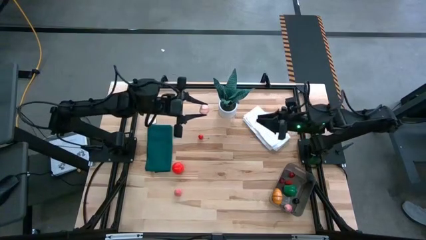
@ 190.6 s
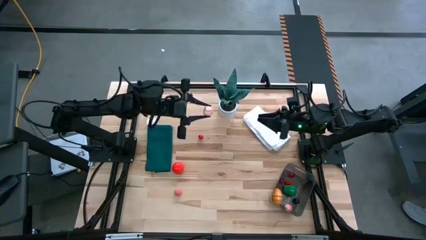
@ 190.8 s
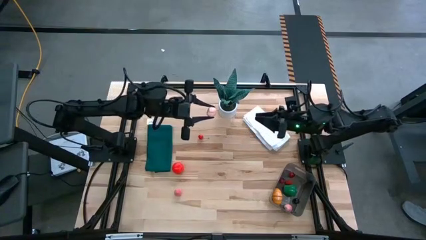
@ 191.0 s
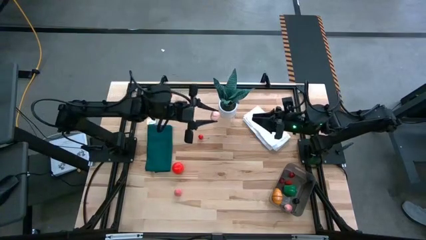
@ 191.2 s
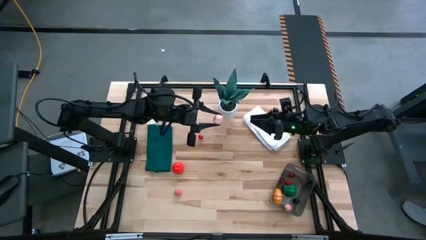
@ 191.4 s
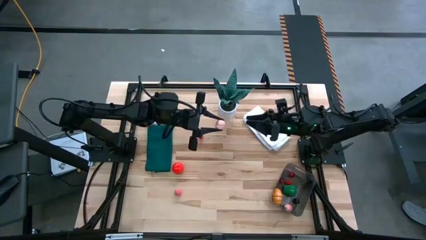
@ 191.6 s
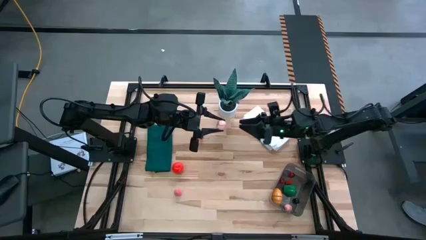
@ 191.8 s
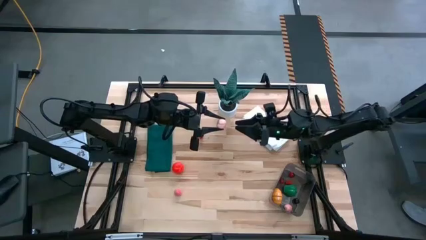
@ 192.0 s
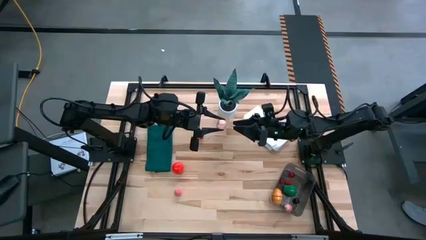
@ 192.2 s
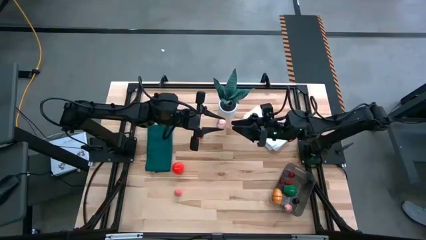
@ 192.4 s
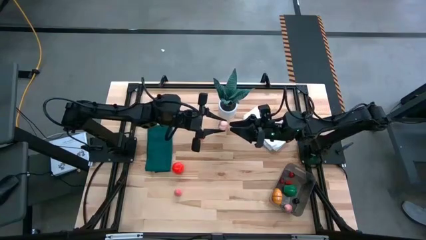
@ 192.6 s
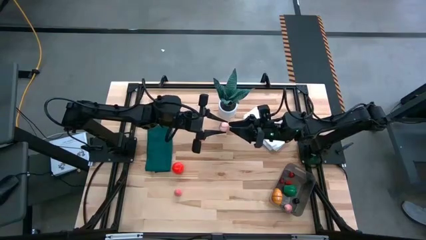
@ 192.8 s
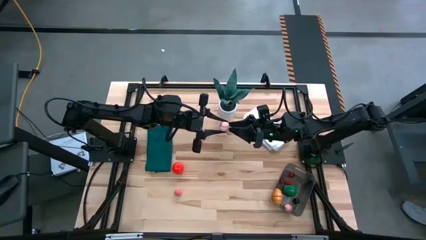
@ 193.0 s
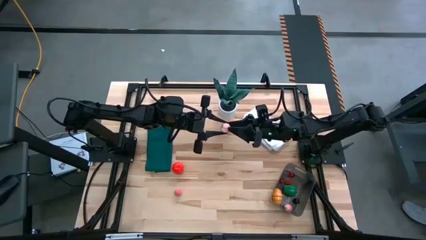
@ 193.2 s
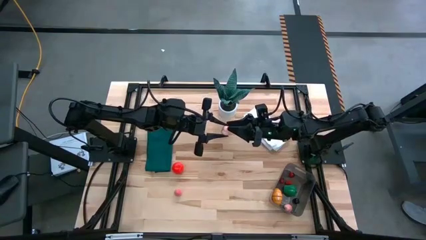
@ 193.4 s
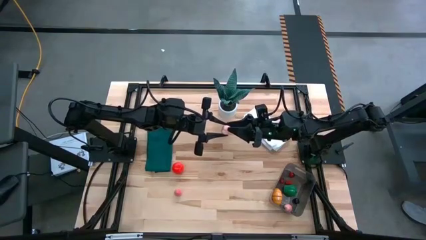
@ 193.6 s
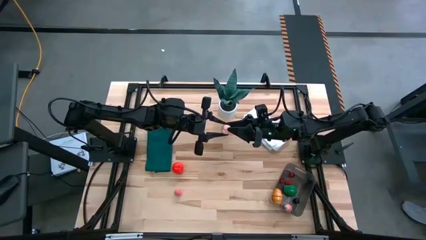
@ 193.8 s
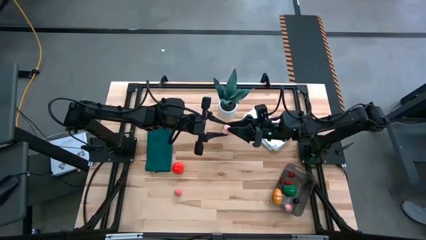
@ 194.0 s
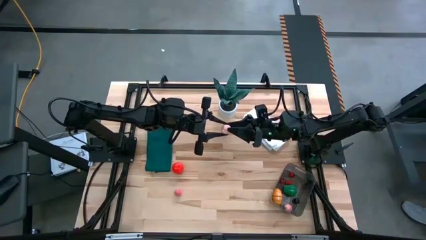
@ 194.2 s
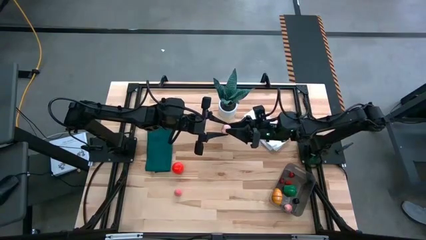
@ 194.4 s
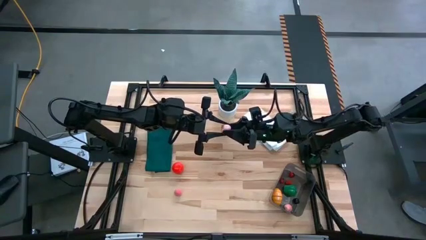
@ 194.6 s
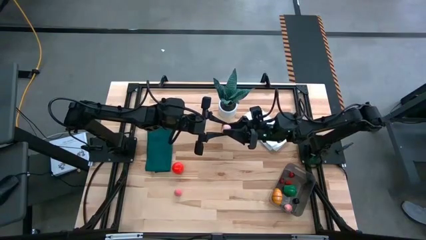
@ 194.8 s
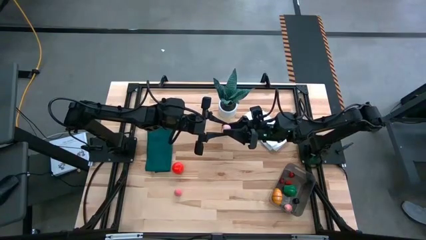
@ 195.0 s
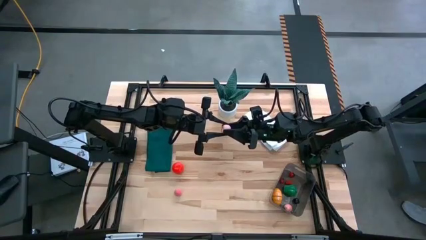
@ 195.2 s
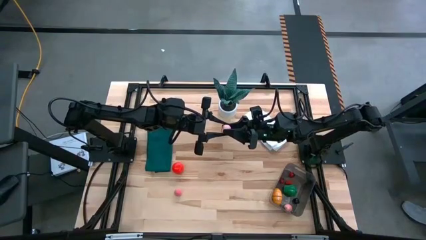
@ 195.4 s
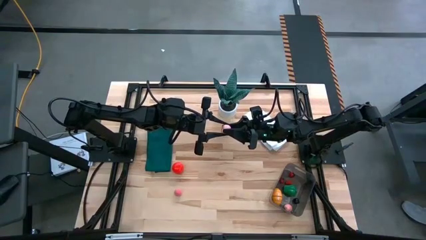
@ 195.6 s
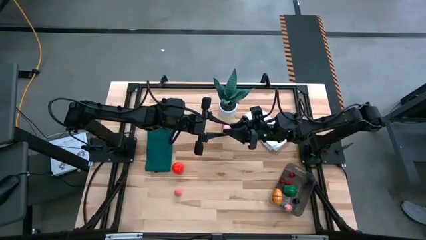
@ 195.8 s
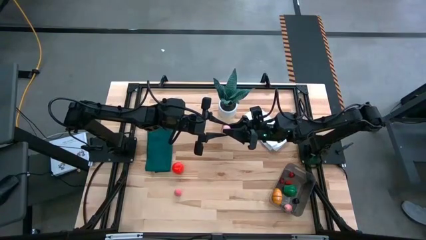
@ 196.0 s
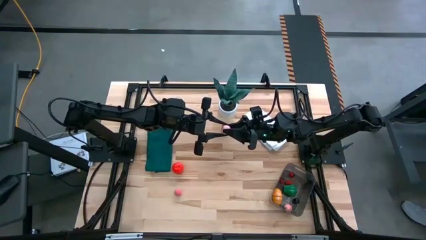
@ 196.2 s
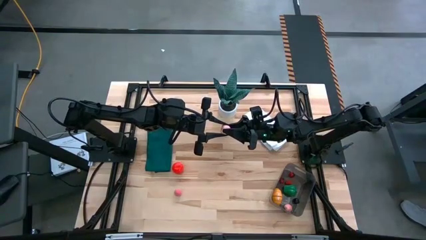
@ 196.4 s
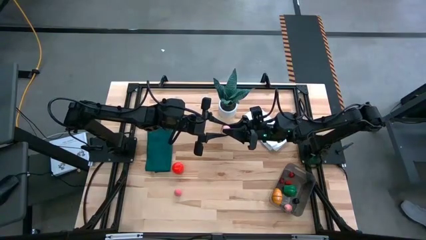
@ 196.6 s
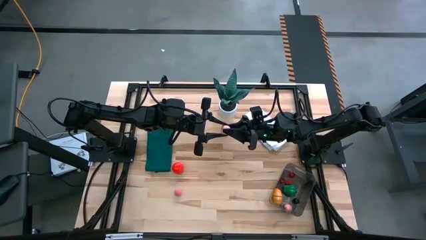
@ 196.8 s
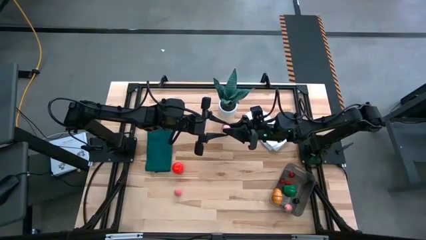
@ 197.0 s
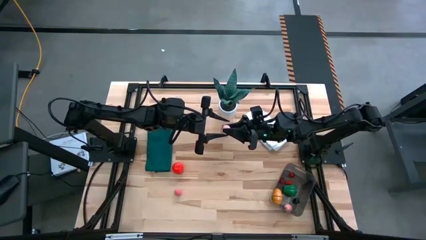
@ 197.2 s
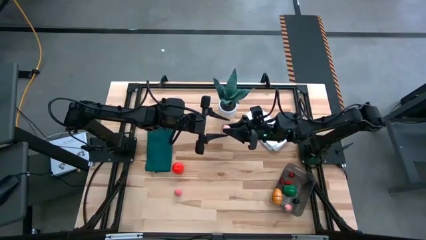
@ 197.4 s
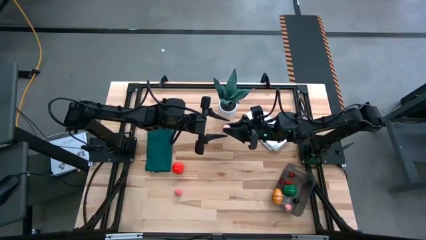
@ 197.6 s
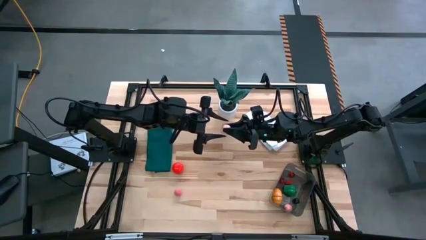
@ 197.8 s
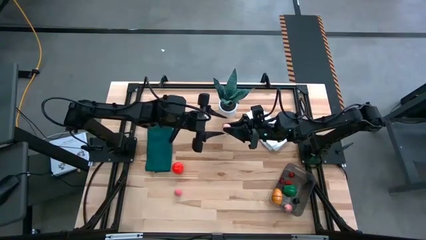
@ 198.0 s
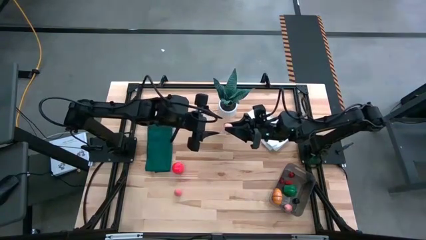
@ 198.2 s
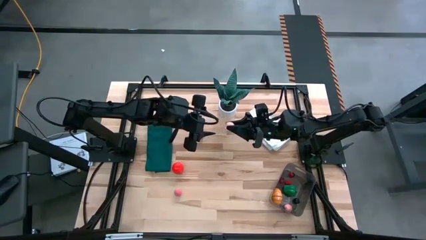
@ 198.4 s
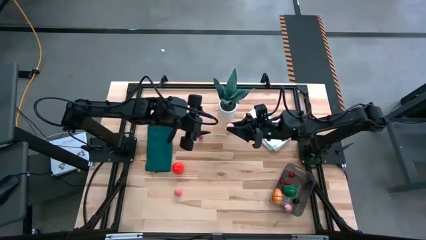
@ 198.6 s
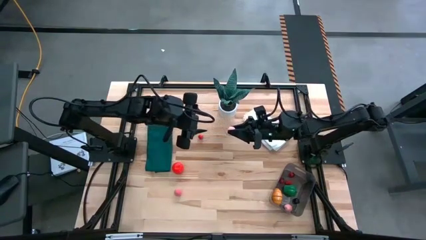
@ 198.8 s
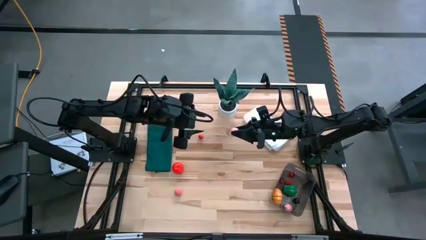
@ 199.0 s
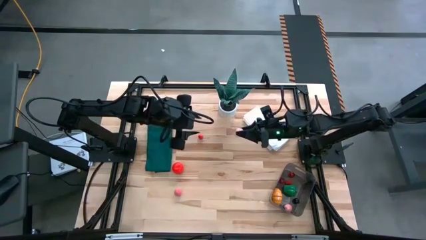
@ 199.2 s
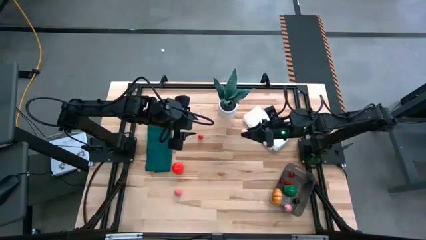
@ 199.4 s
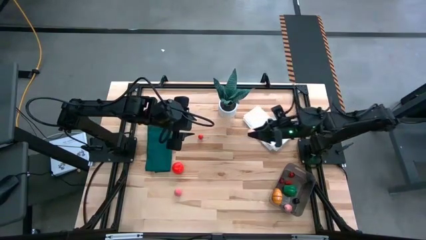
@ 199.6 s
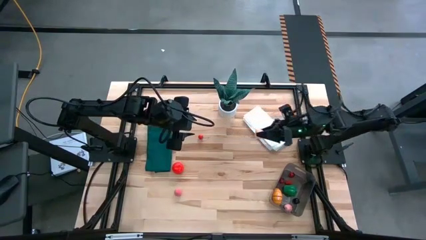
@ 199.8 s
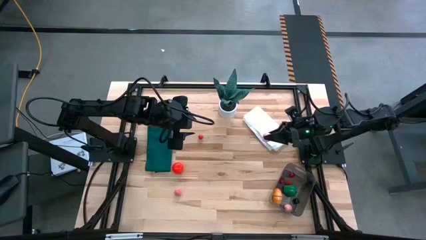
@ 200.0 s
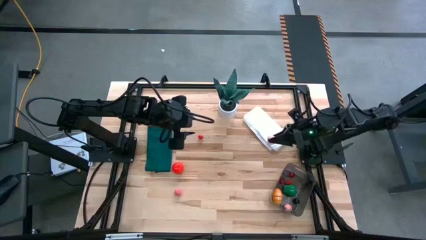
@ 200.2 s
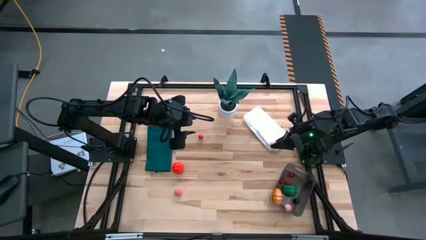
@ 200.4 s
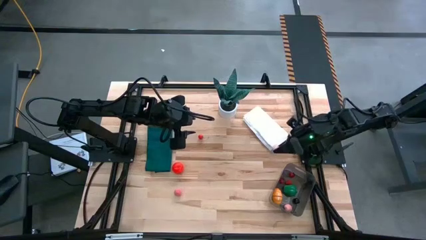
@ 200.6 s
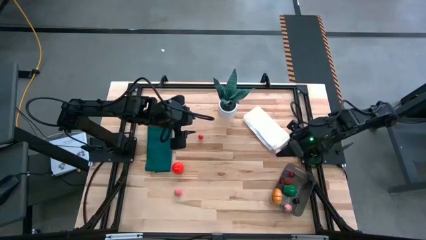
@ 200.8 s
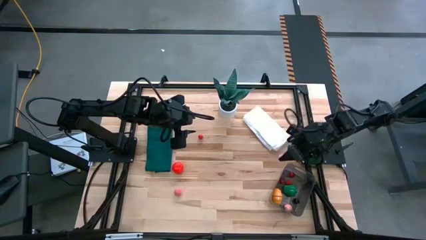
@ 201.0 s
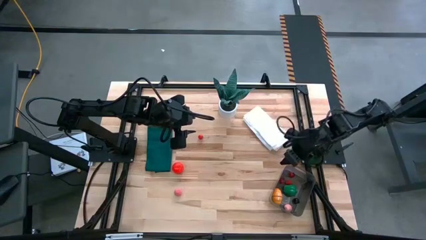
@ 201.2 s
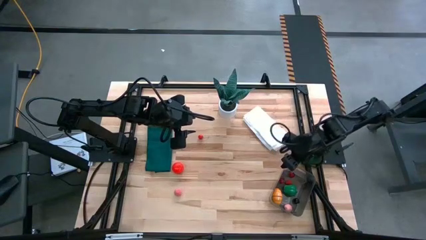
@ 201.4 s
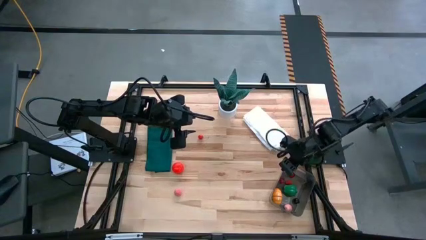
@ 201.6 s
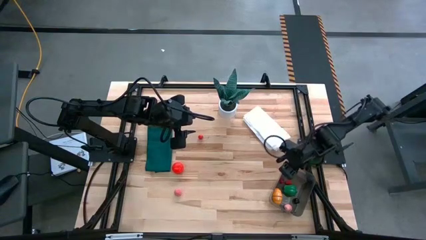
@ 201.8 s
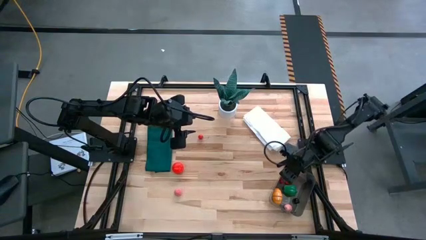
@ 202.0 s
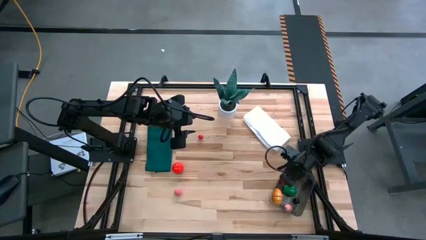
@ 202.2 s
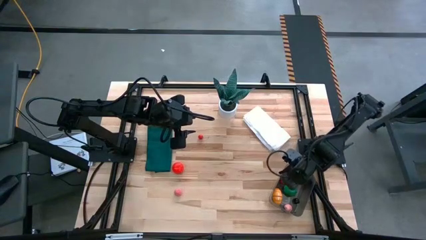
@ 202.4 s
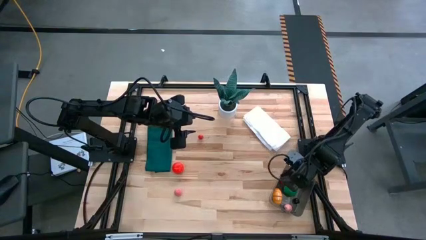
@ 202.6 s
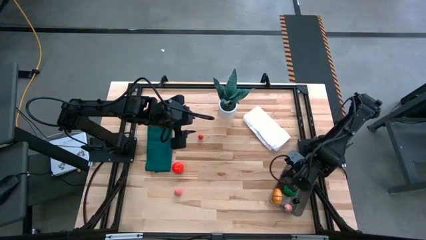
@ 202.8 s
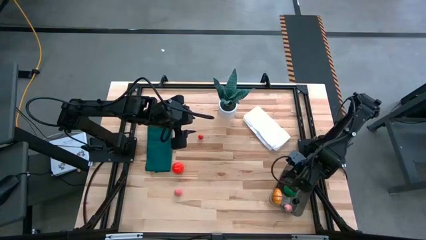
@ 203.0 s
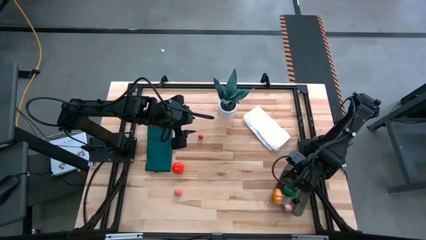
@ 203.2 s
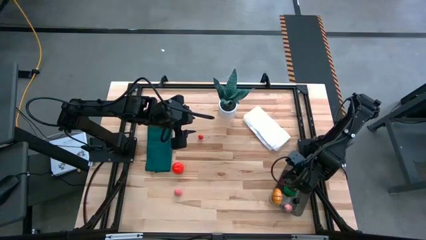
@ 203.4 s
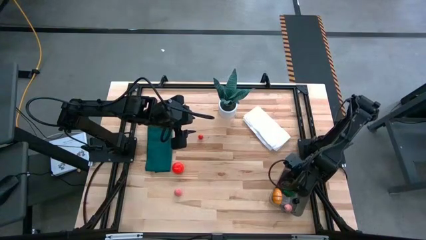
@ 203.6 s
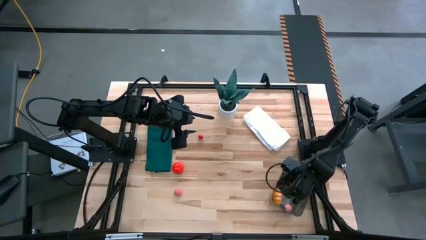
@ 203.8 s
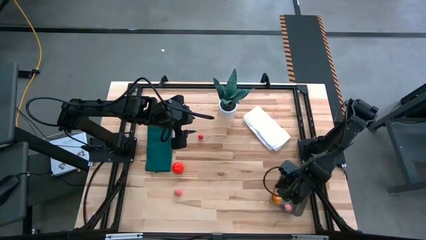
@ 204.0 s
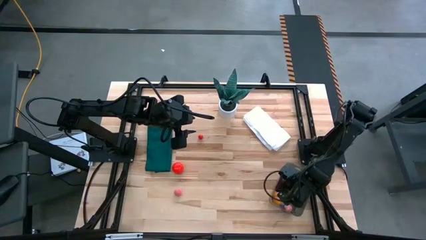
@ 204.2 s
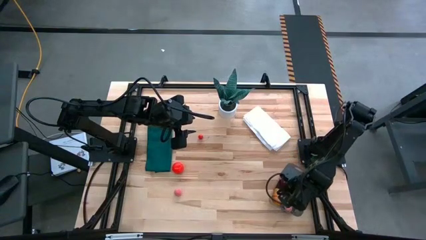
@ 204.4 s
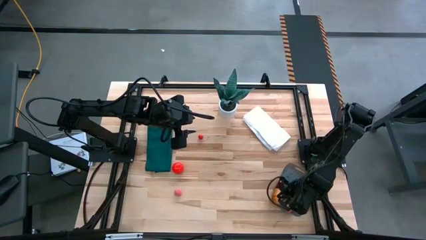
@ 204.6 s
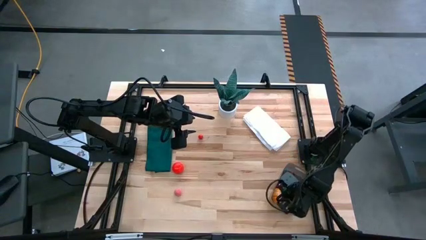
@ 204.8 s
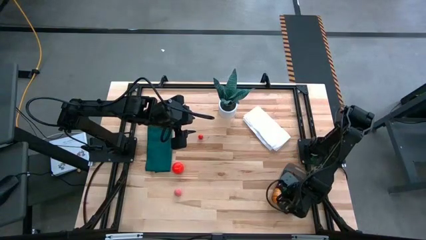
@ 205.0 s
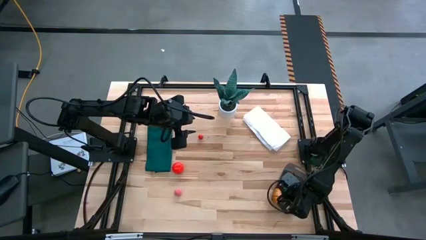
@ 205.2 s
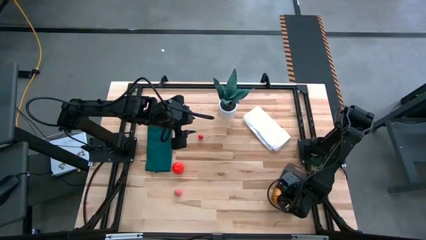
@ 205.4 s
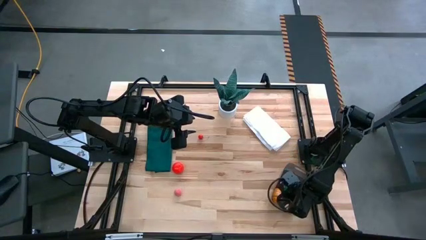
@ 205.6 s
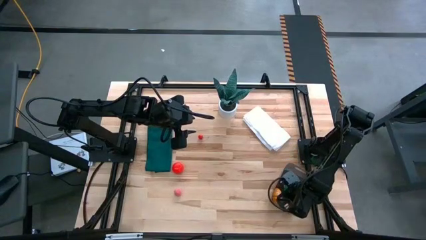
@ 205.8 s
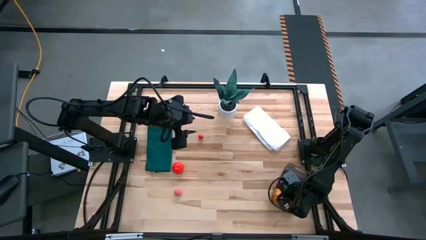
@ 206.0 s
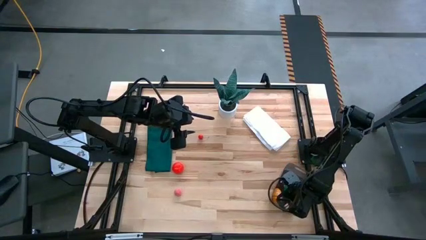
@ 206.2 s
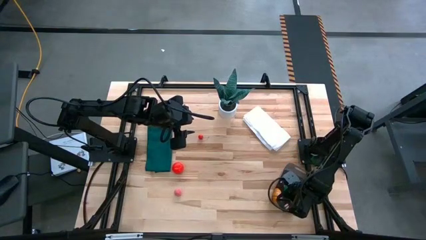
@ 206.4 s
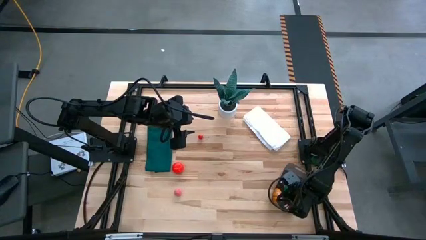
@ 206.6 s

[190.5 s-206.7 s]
Task: Pick and placing Produce into tupperware
Put the top pink peach into the black bin
